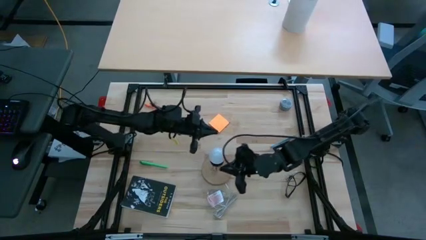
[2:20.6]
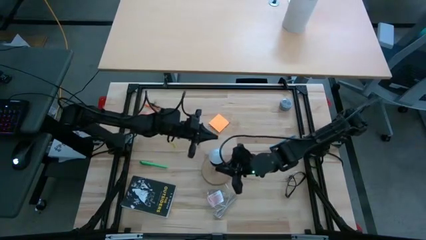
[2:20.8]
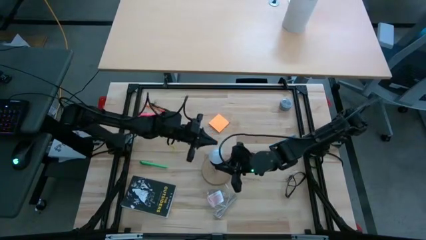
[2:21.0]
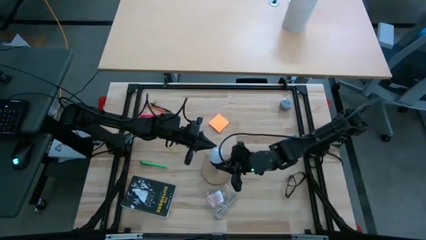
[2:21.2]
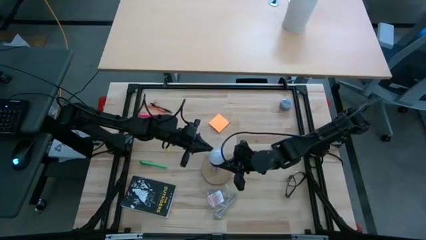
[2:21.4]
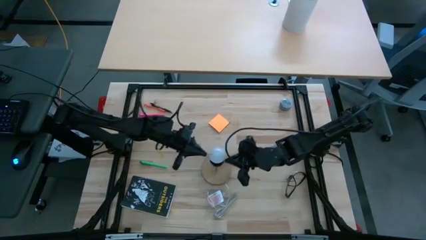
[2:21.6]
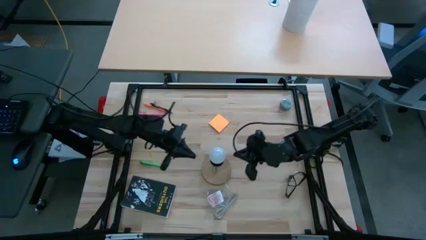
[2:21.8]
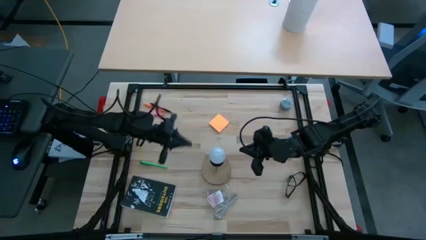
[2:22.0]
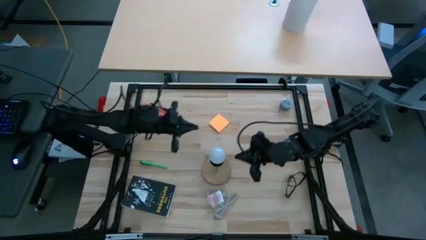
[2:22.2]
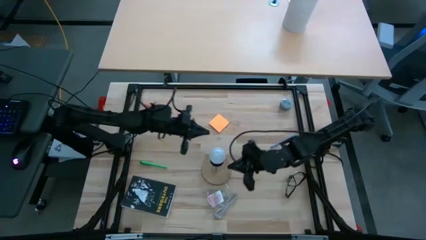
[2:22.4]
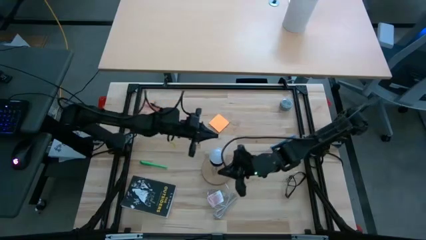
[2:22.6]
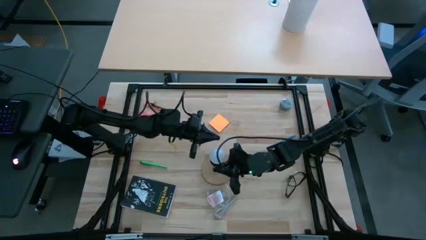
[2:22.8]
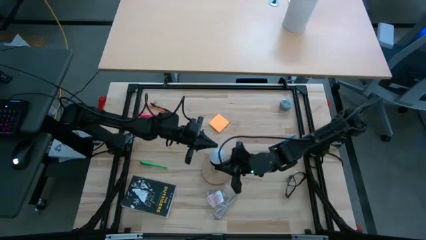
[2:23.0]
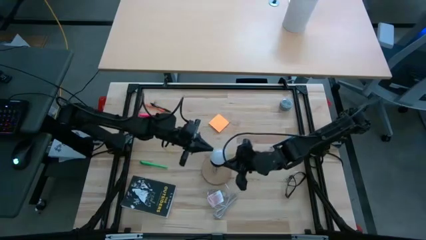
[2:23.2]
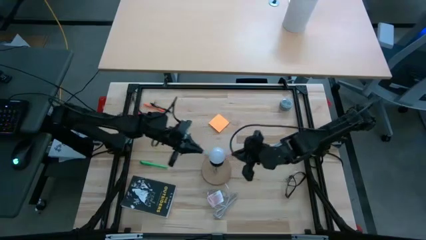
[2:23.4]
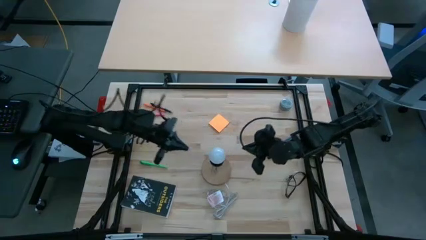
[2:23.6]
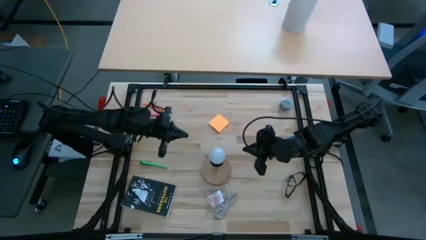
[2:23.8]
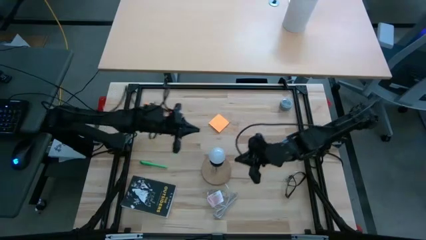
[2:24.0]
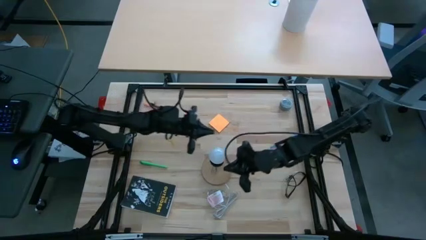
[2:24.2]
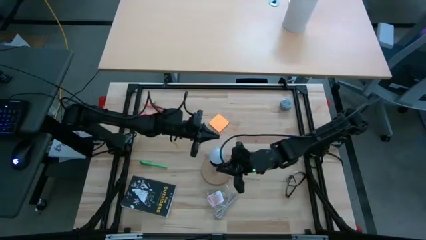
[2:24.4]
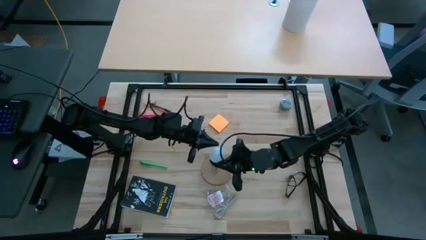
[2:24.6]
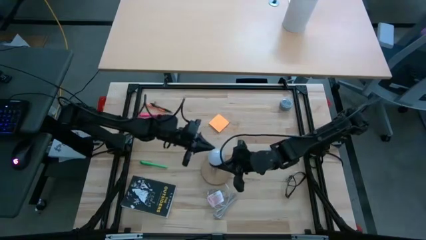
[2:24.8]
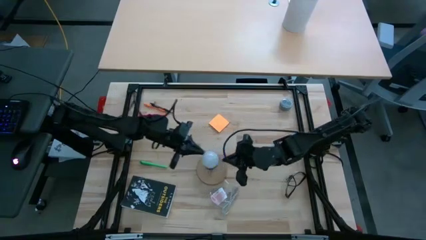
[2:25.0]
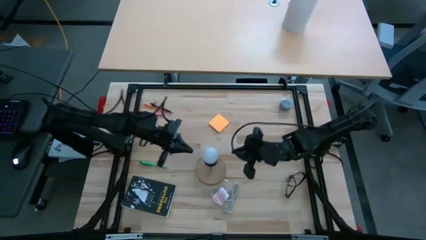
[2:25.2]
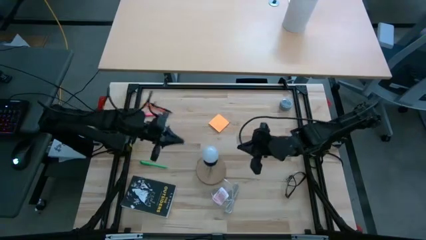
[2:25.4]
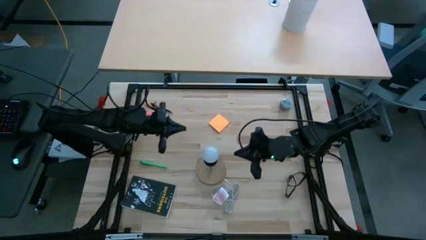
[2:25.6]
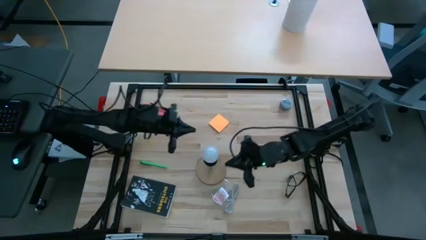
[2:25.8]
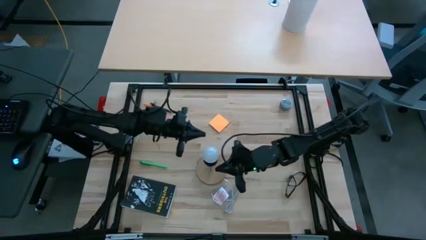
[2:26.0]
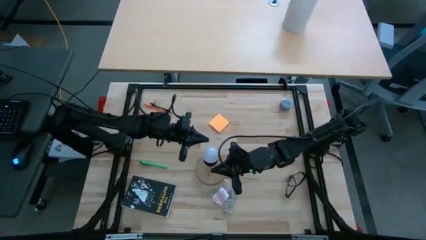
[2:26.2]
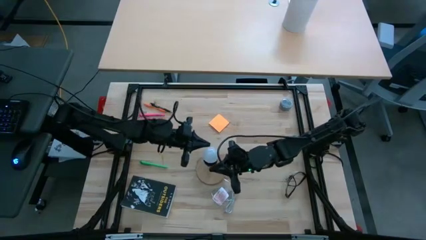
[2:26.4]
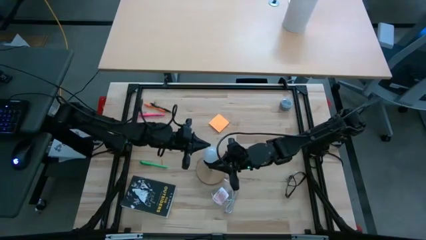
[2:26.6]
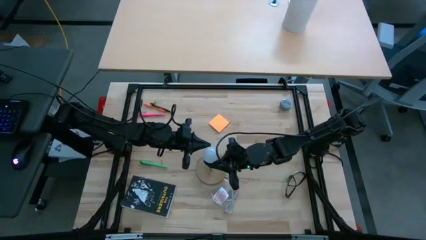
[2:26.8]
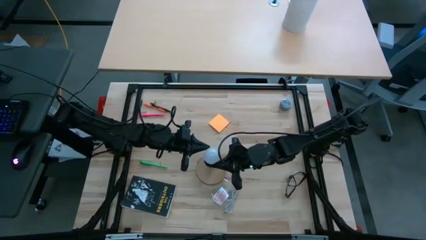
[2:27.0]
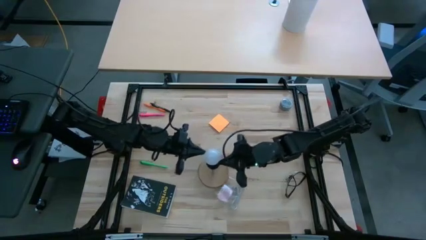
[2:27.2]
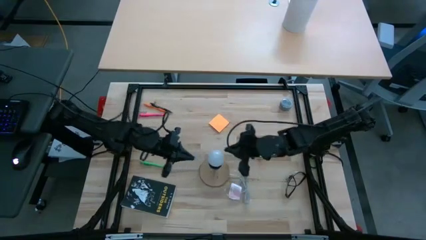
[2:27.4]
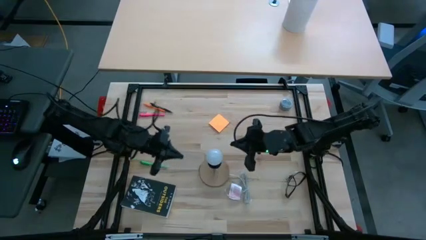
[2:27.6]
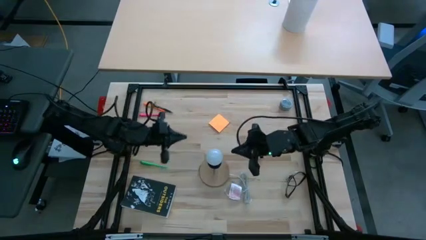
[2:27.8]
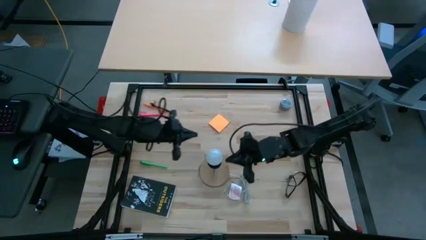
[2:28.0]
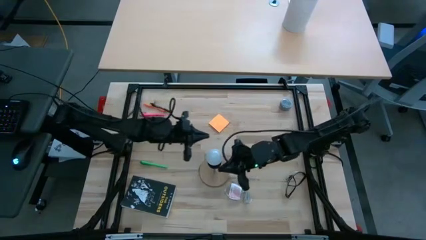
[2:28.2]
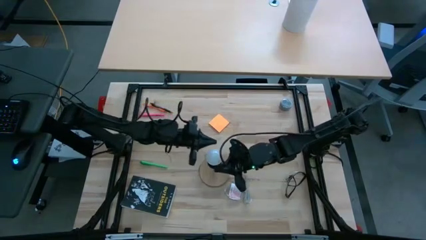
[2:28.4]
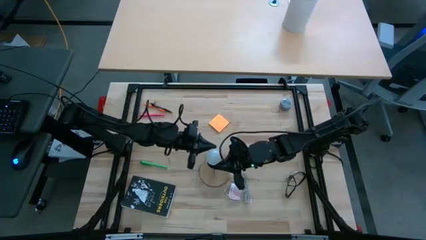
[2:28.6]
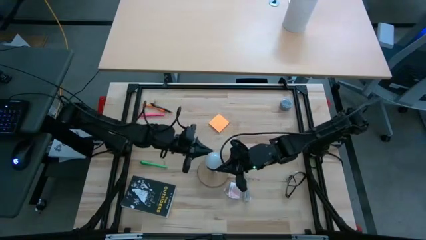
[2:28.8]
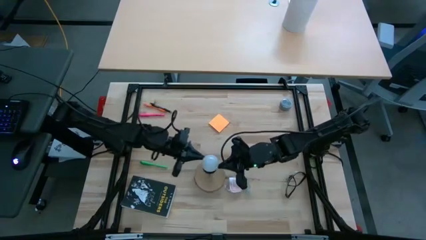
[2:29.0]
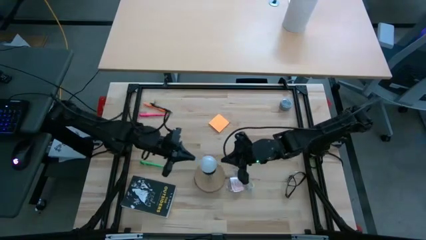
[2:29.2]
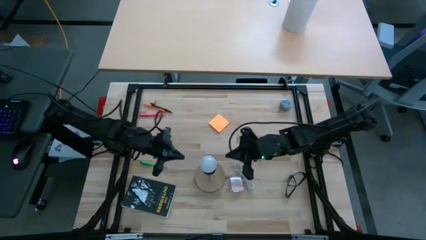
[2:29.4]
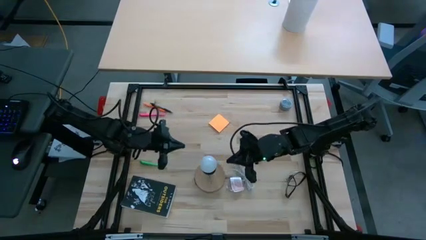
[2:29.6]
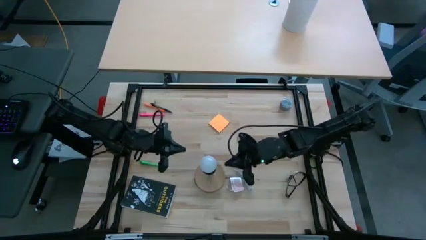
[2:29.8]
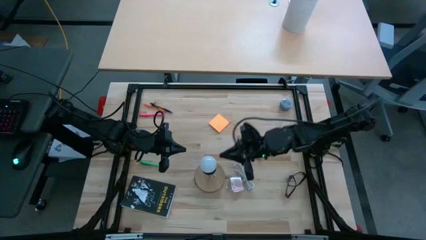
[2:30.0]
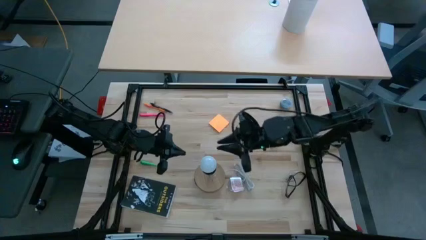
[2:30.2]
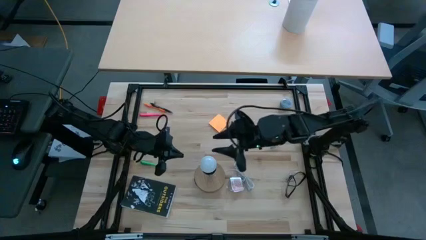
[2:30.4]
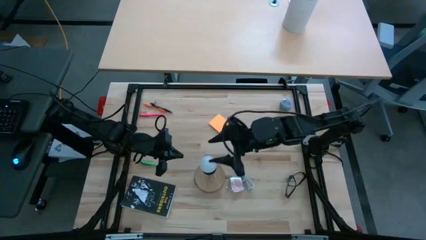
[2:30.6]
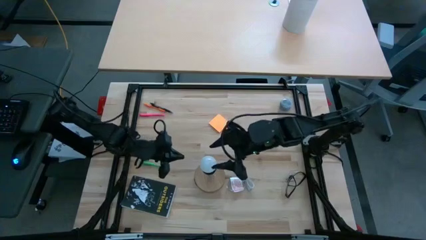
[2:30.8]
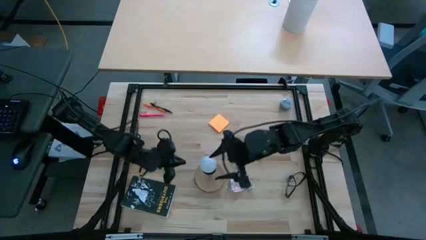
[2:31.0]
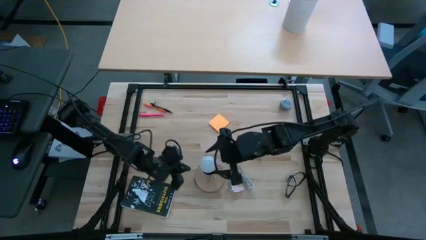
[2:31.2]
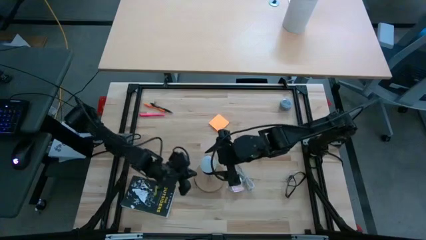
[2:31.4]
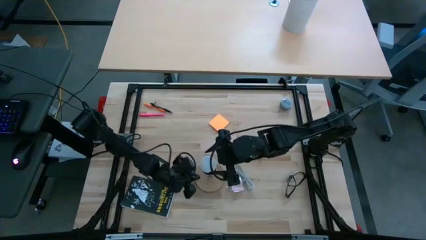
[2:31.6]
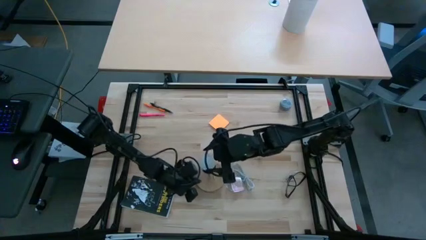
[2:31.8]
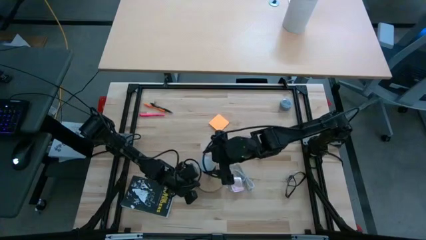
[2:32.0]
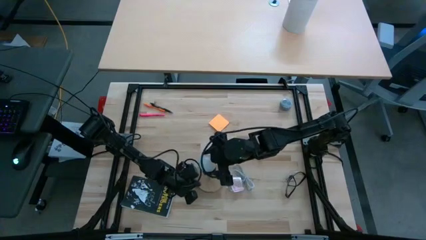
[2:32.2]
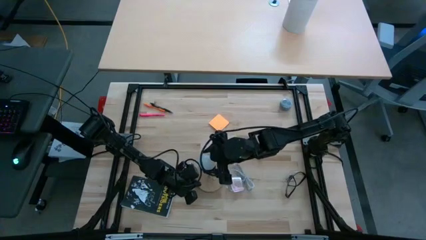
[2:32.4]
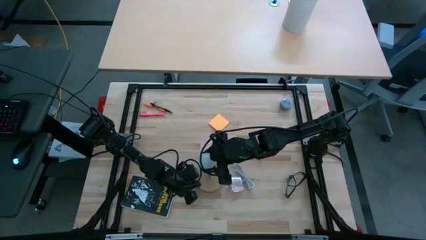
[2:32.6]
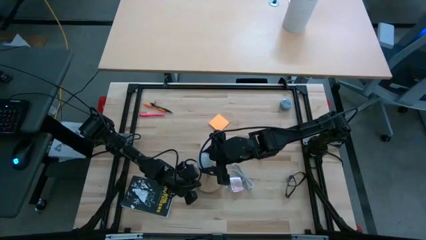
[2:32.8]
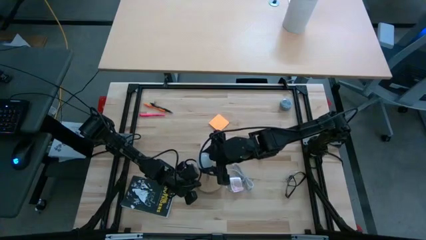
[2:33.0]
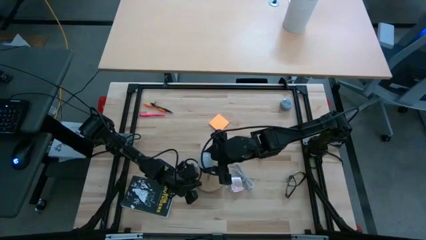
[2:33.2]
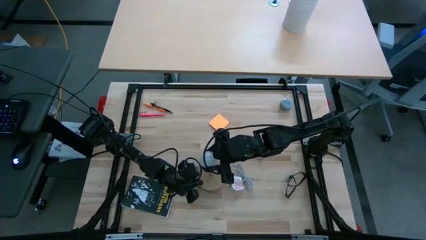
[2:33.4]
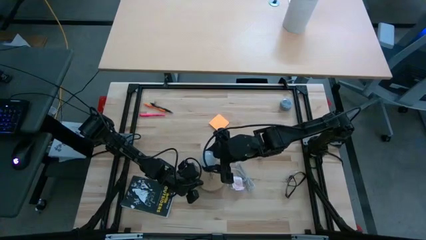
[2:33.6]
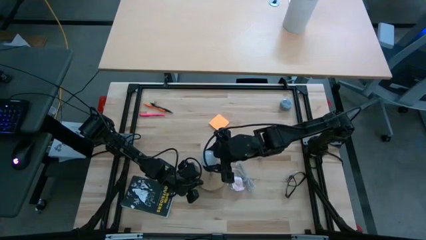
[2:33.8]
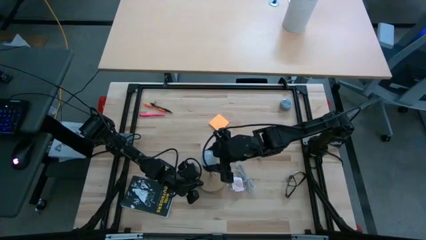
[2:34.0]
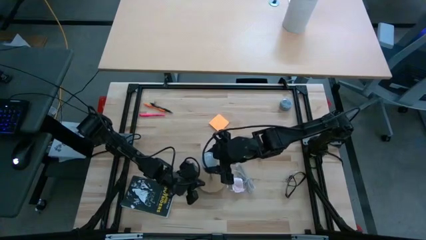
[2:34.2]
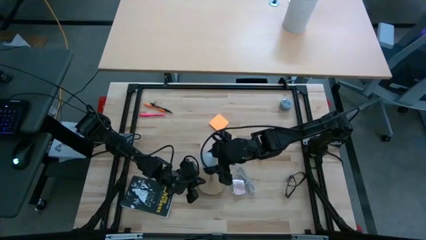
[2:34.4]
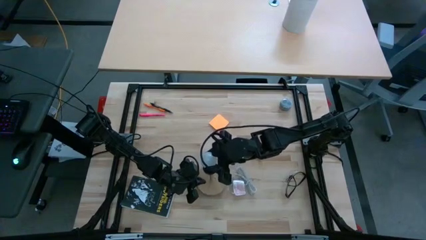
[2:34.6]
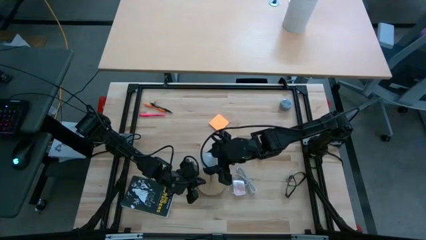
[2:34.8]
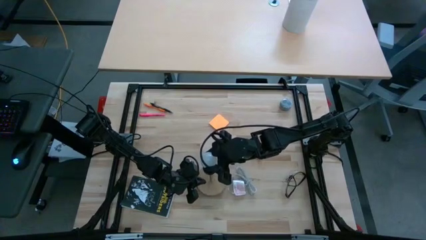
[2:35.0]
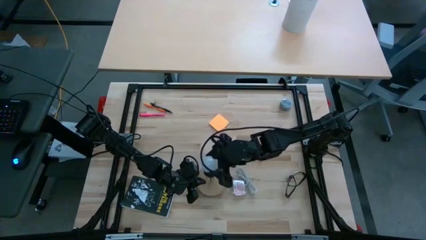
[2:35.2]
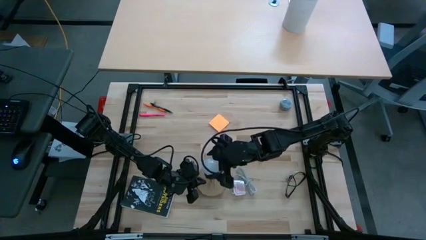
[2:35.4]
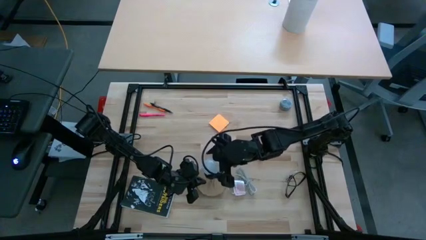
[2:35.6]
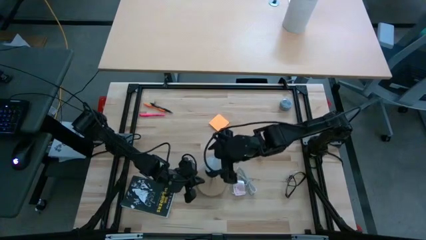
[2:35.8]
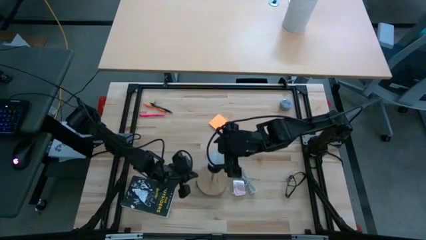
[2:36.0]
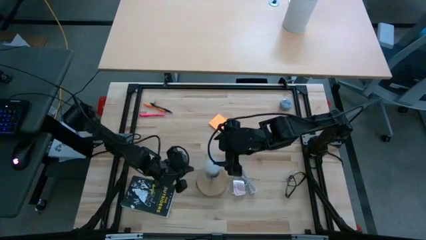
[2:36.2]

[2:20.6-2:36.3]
Task: Screw lightbulb
Remove the white lightbulb from the lamp
